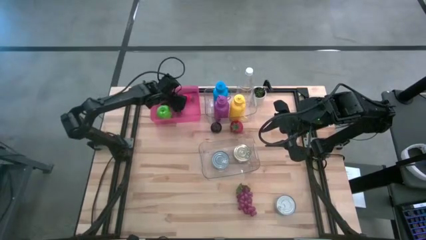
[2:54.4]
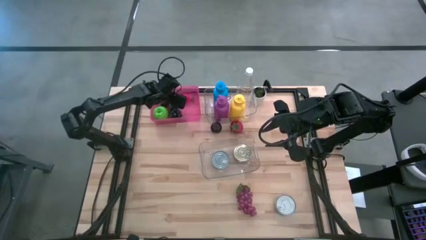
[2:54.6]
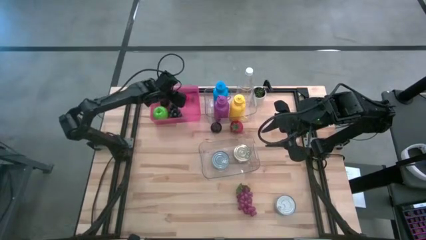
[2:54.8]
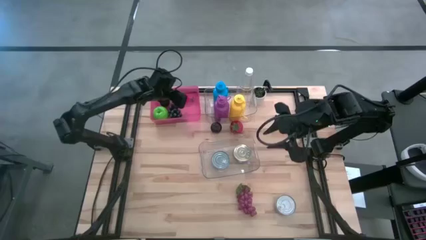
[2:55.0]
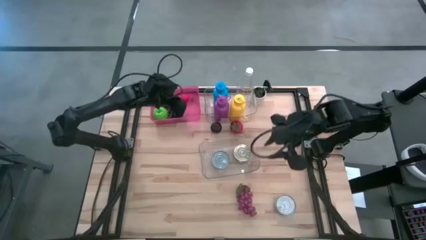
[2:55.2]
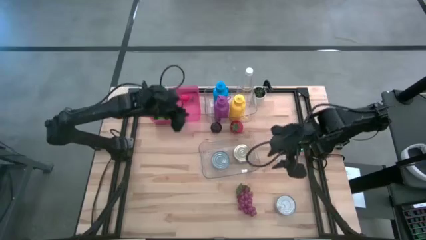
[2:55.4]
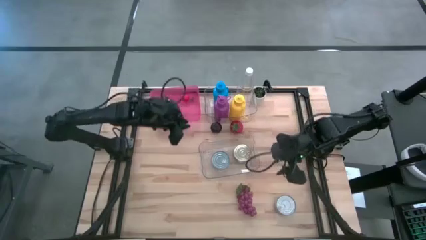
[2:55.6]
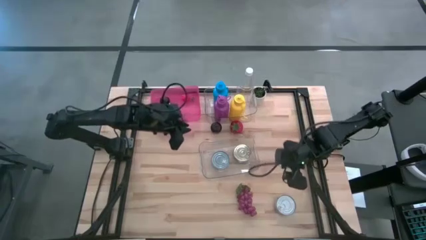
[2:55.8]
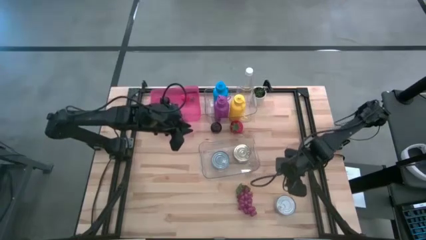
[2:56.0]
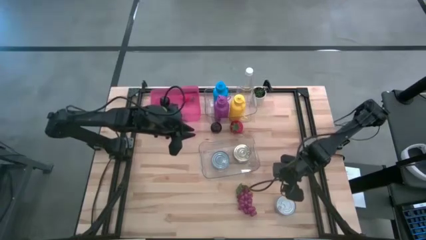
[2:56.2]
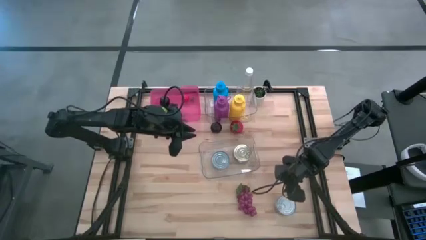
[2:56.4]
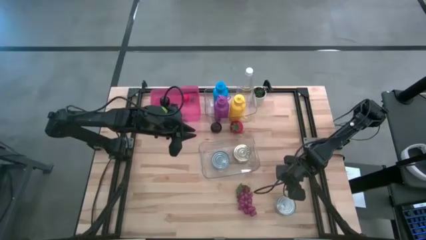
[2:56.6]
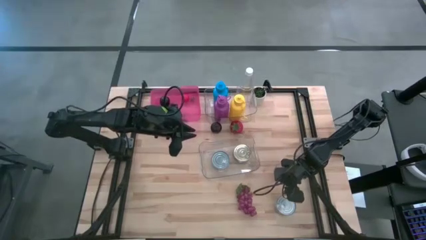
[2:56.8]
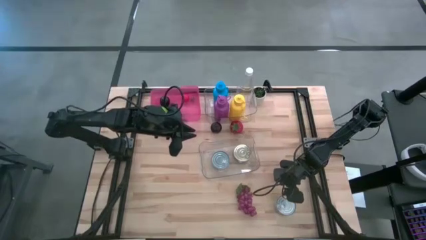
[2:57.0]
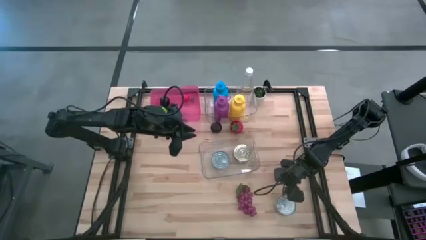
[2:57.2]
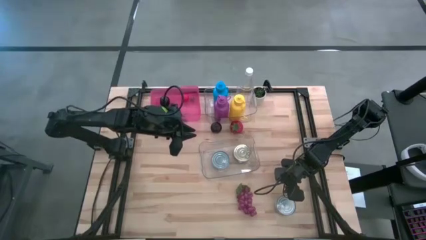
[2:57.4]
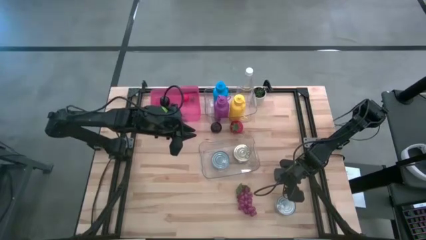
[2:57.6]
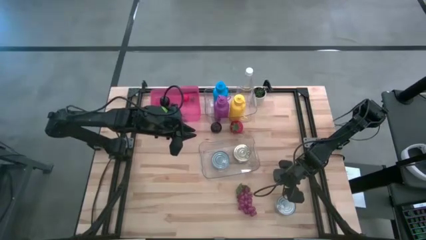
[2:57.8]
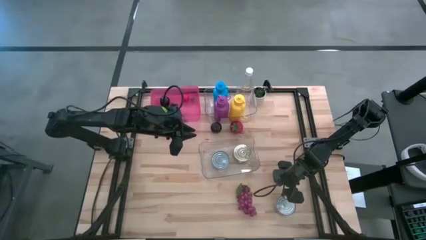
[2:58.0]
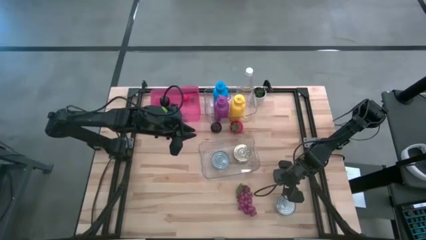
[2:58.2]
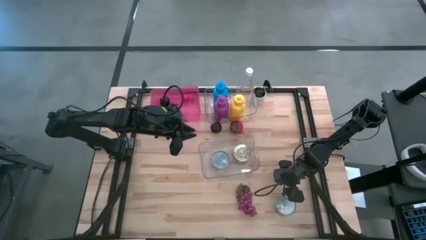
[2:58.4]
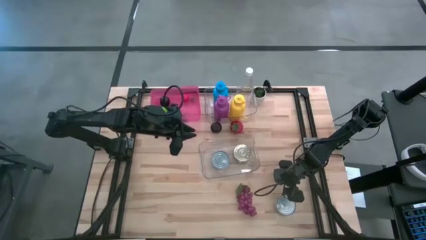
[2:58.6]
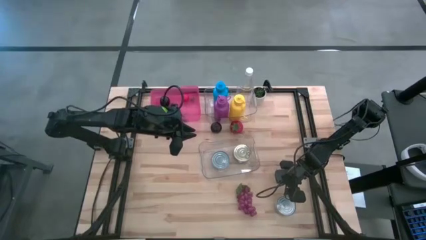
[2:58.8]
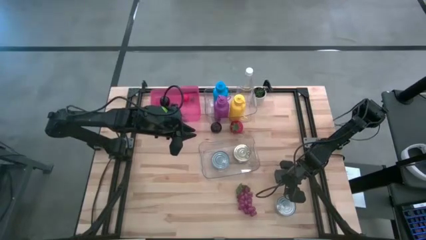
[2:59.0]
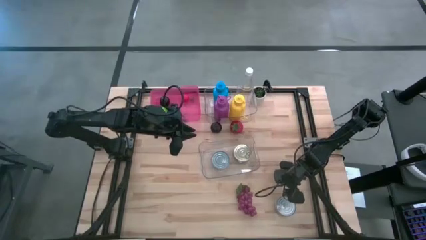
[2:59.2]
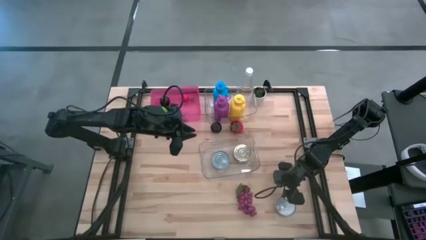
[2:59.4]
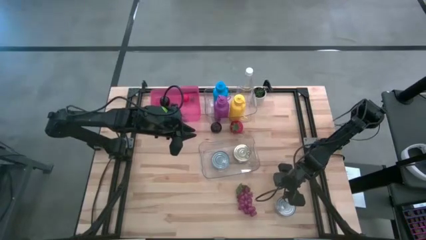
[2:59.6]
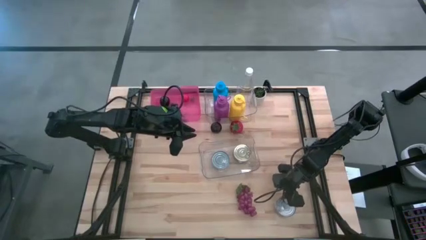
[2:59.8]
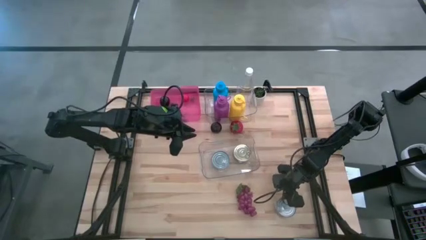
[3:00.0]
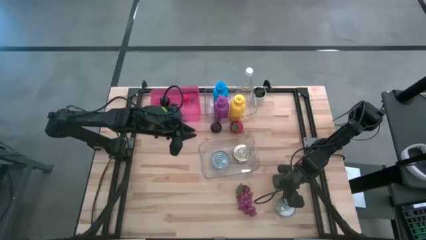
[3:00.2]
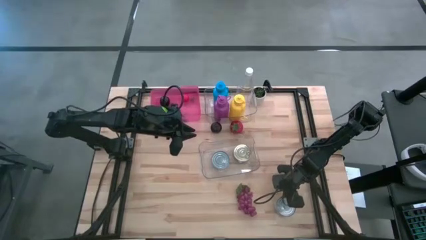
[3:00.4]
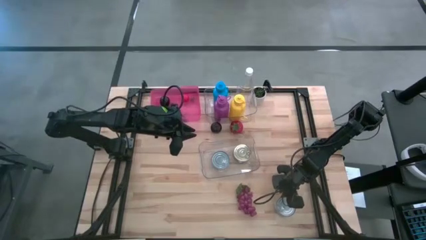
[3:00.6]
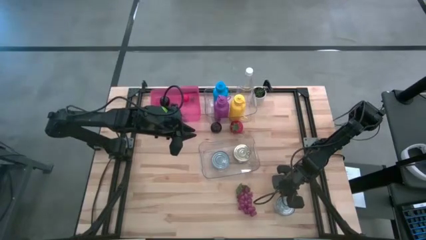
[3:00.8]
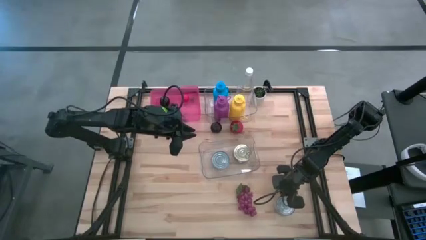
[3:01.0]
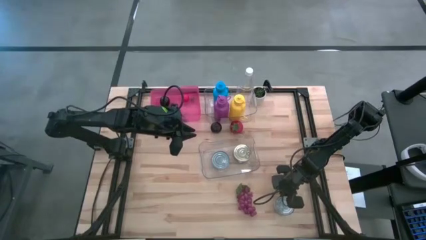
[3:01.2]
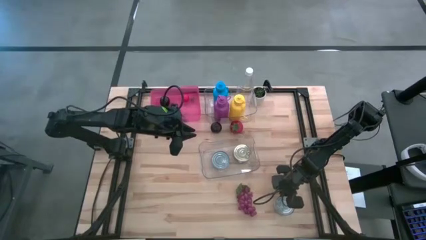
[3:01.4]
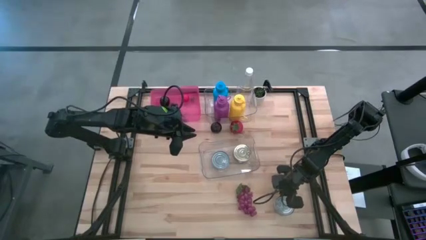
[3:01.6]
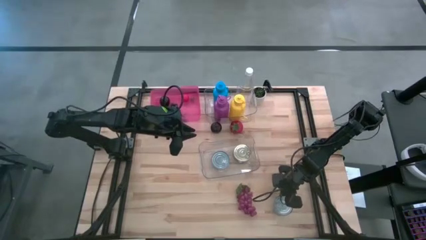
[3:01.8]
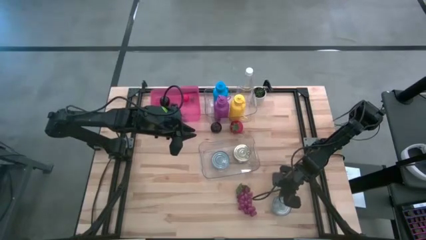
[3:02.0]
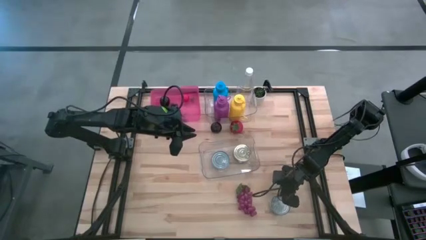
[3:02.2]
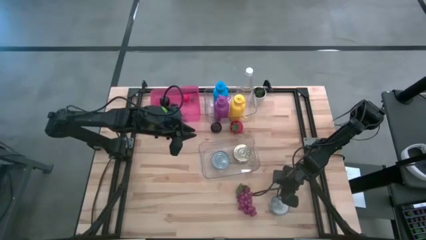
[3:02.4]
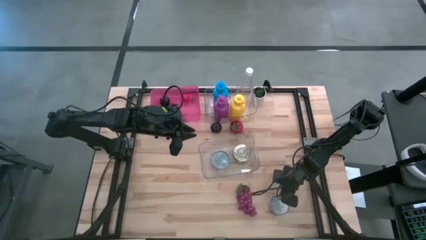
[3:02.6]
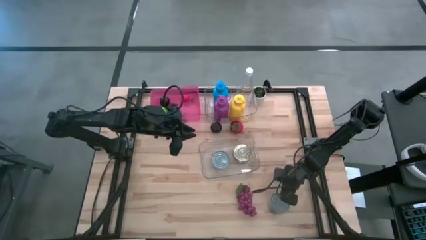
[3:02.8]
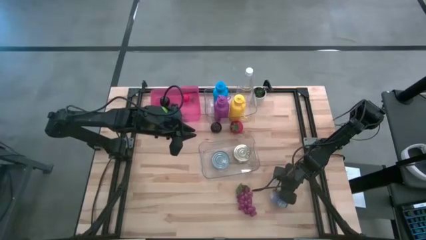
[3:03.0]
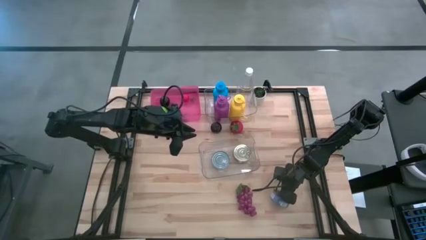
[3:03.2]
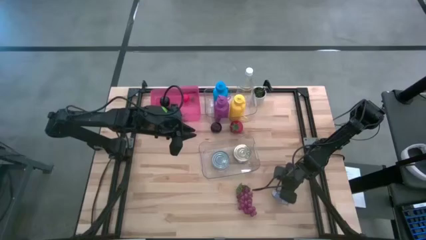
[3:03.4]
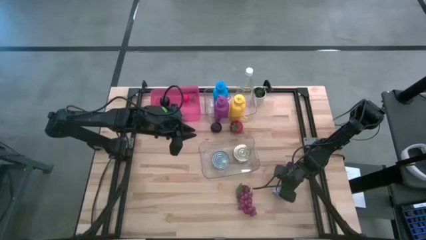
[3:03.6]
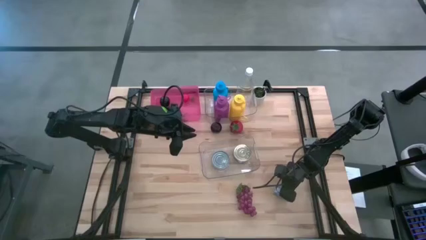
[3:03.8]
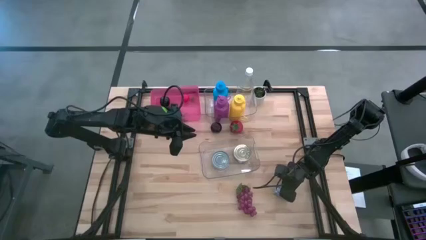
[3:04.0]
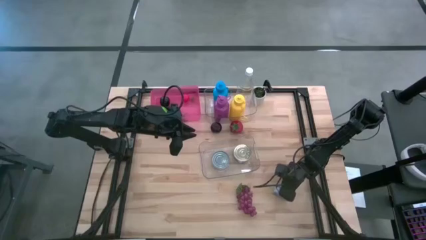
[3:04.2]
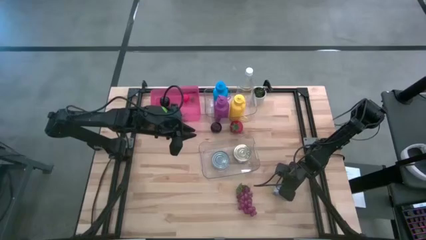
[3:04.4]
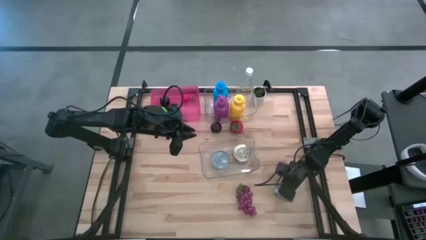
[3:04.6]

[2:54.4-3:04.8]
Task: Pick & Place Food Item
Put the blue tuna can into the bottom transparent bin

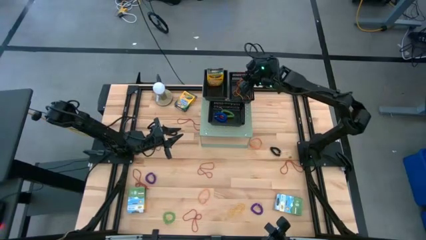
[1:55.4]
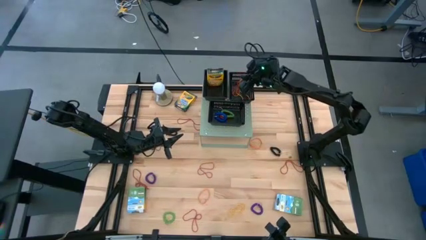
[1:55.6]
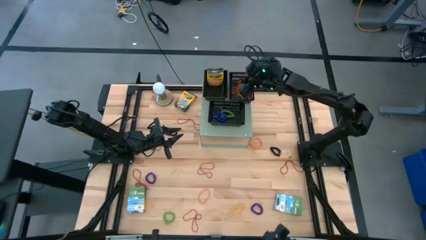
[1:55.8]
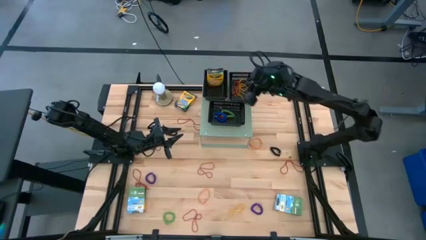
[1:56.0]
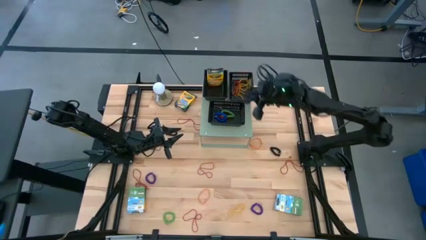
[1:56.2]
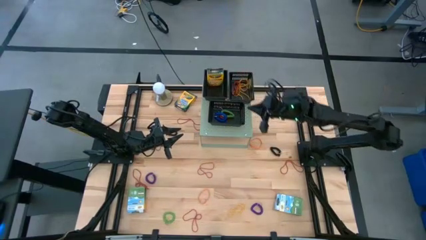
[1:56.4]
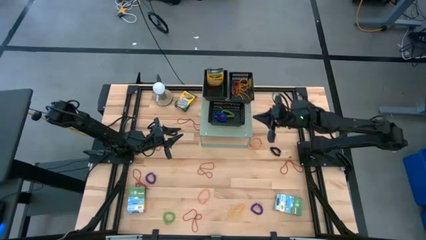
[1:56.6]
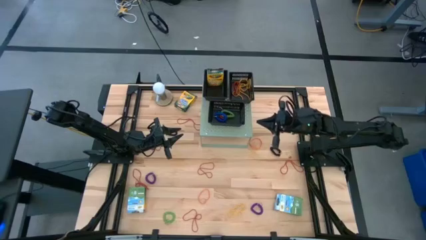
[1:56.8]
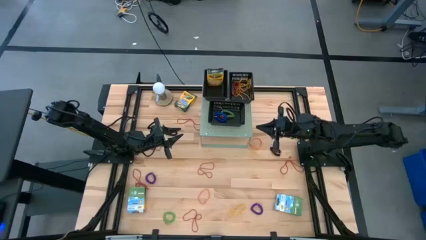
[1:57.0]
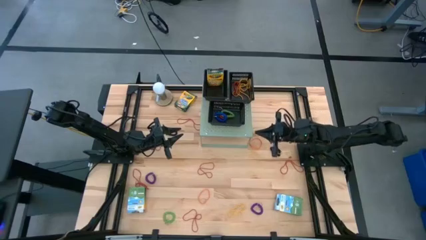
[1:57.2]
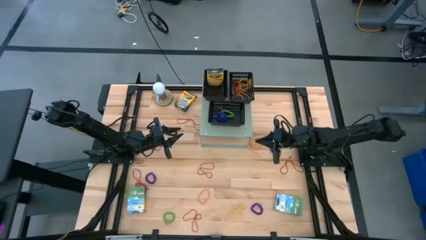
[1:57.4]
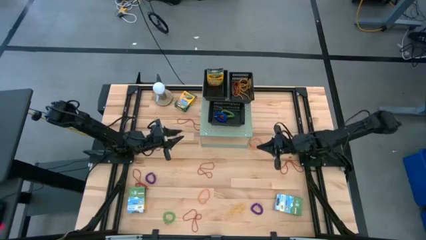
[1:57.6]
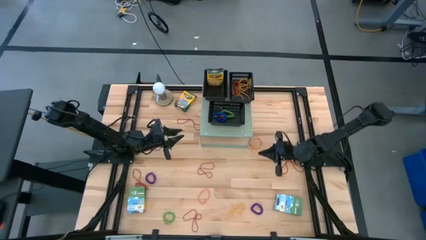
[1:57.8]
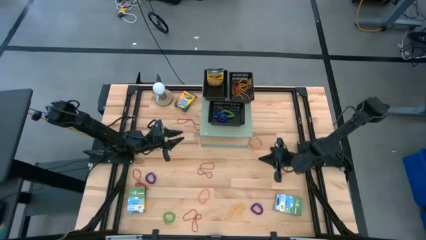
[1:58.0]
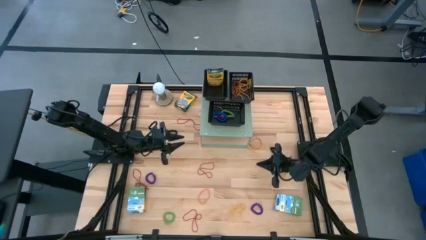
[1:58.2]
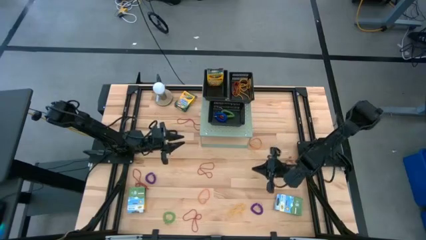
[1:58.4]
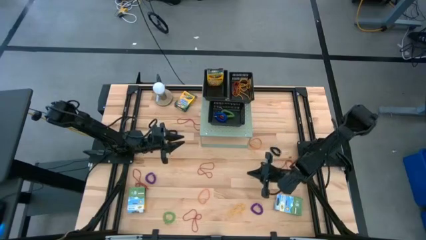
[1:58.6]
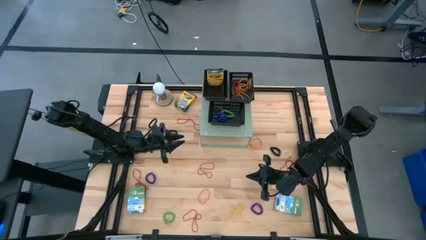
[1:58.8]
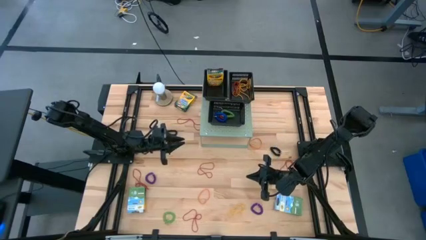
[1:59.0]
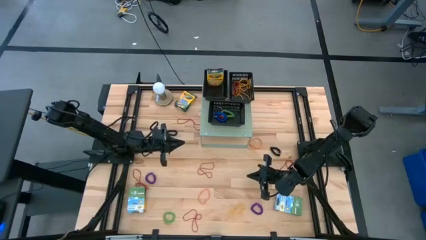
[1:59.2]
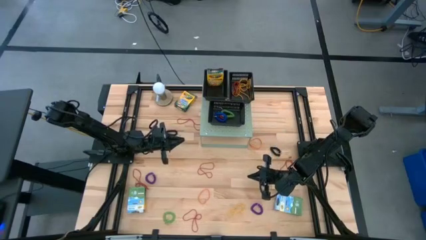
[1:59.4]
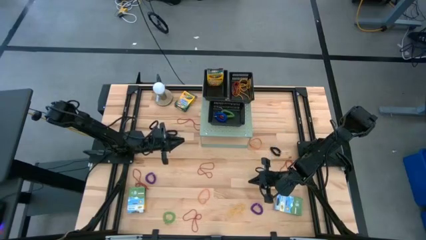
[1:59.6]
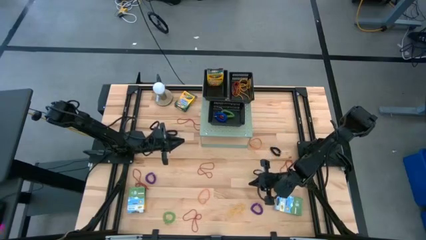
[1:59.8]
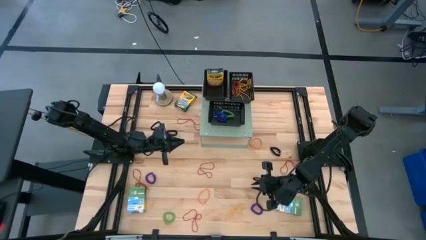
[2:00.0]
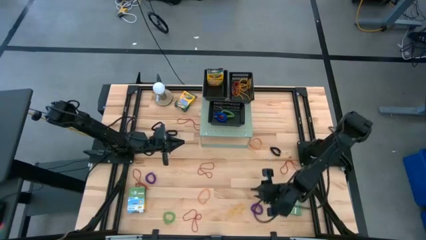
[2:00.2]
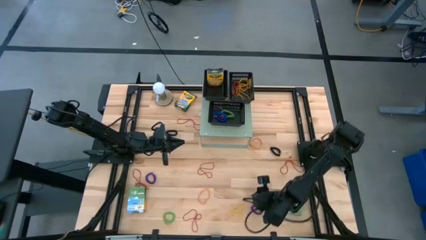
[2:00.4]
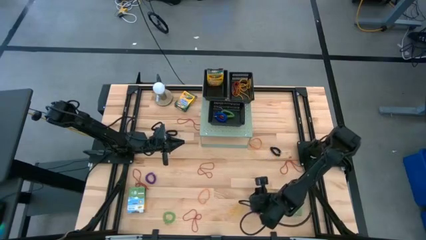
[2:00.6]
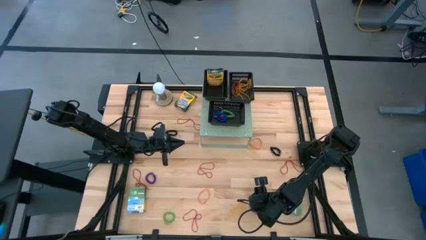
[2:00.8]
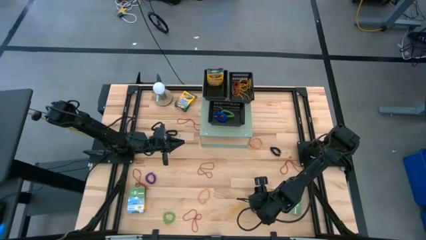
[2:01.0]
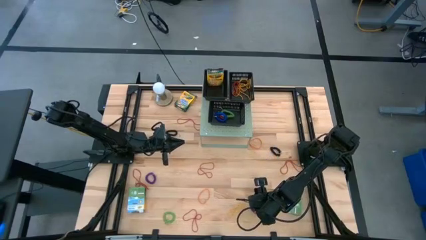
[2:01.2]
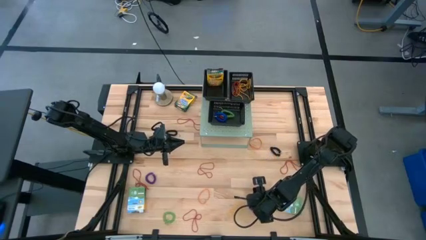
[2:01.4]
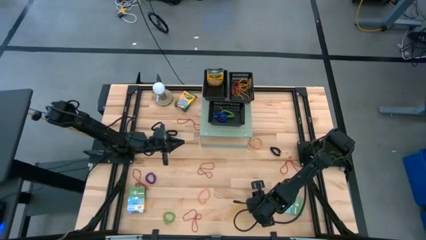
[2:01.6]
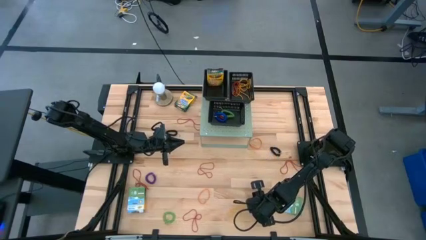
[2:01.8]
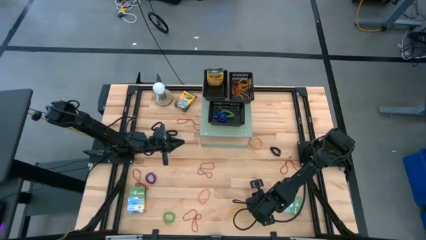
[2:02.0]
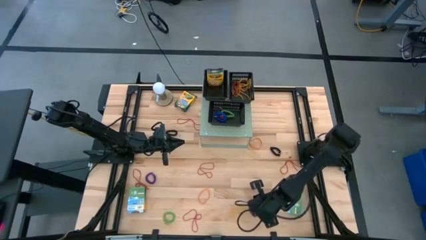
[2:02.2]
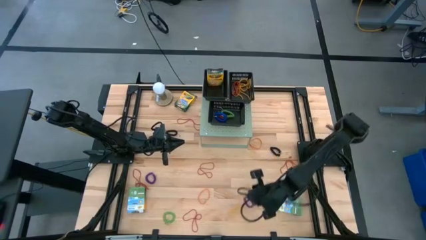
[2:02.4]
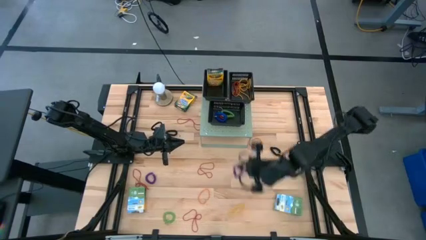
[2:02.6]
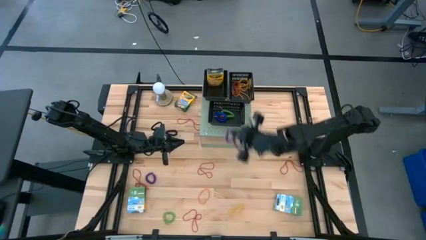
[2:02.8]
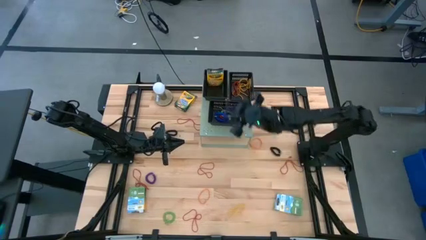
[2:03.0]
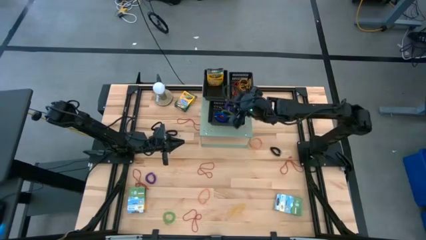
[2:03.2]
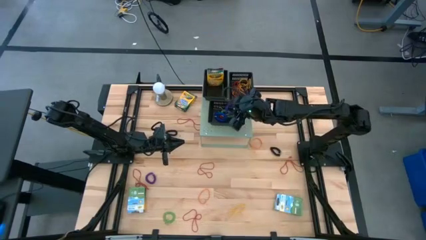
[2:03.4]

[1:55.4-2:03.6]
Task: Pick & Place Office Desk Supplies
Put the violet spring keychain into the bottom black bin on the shelf
